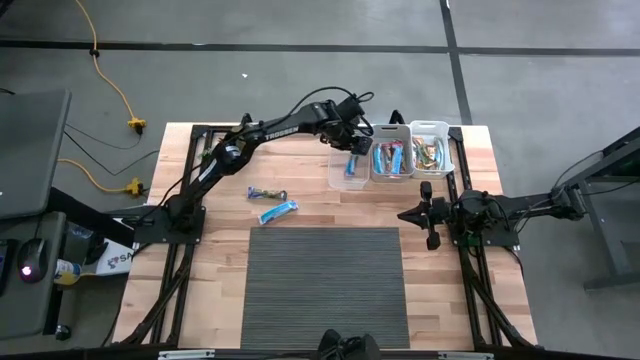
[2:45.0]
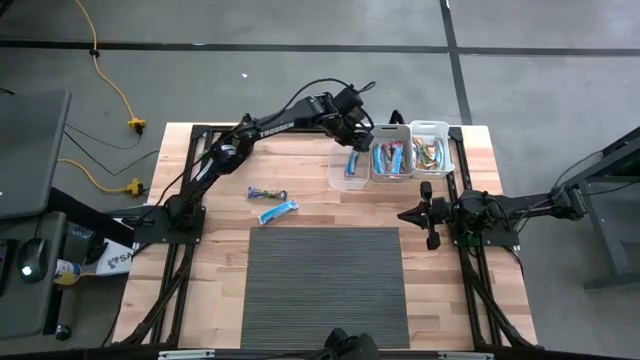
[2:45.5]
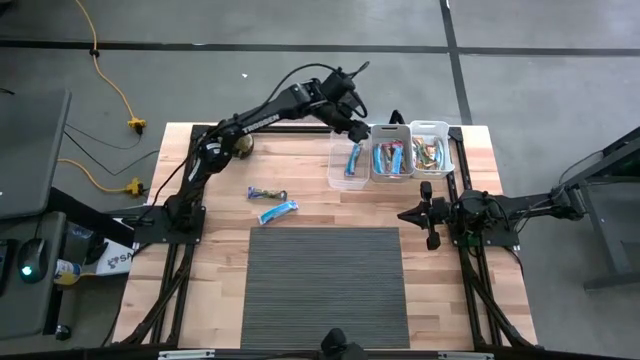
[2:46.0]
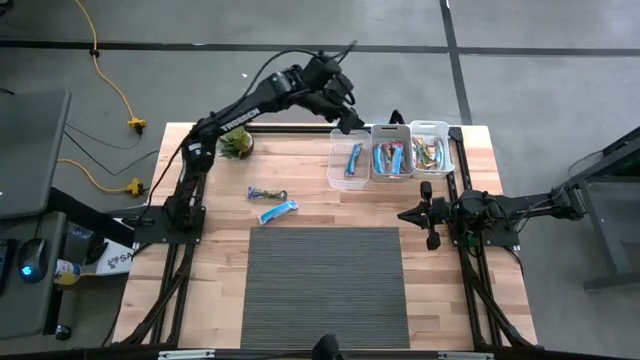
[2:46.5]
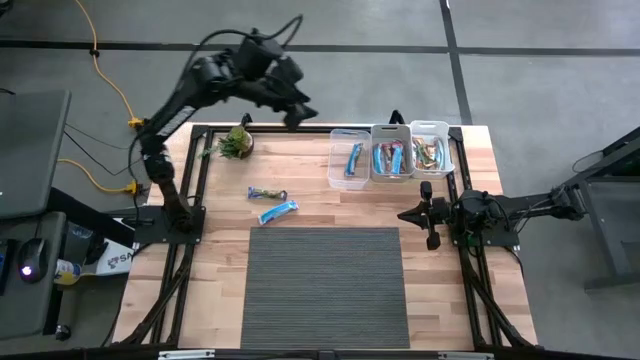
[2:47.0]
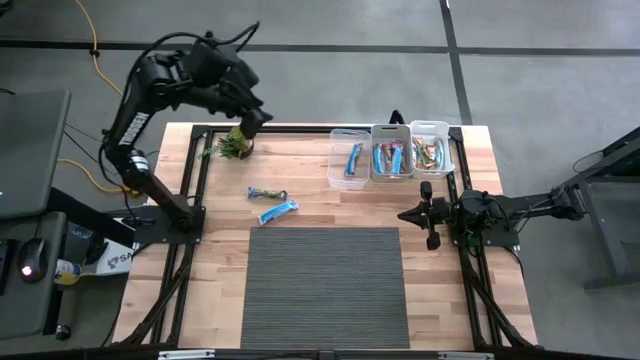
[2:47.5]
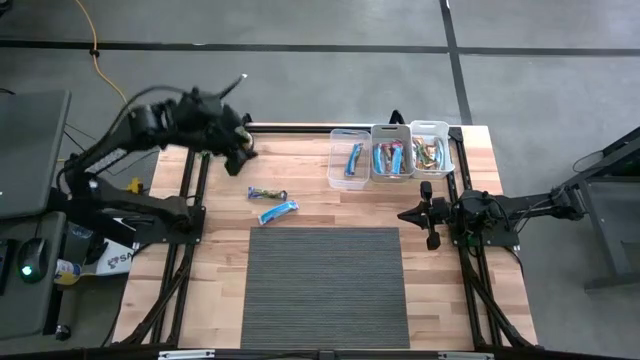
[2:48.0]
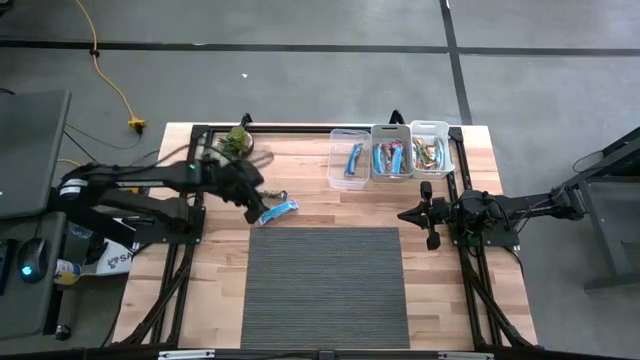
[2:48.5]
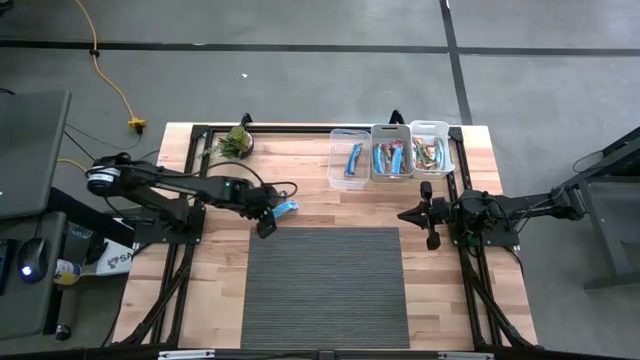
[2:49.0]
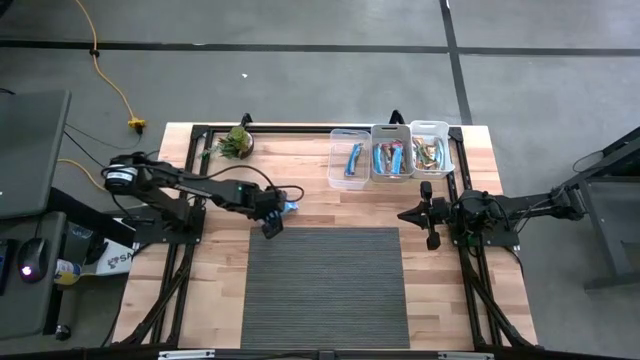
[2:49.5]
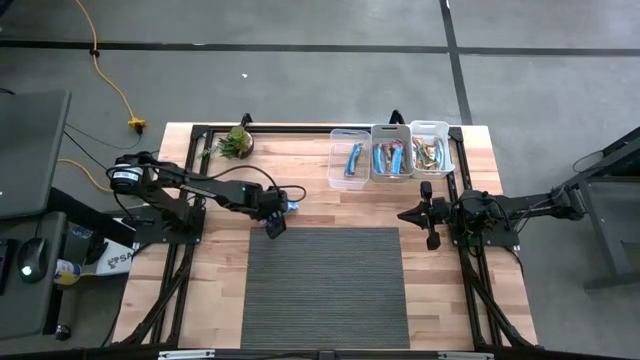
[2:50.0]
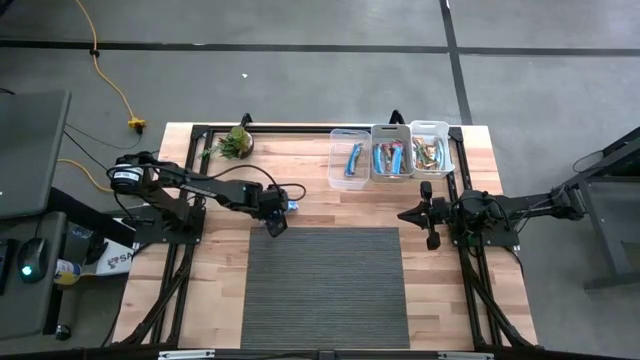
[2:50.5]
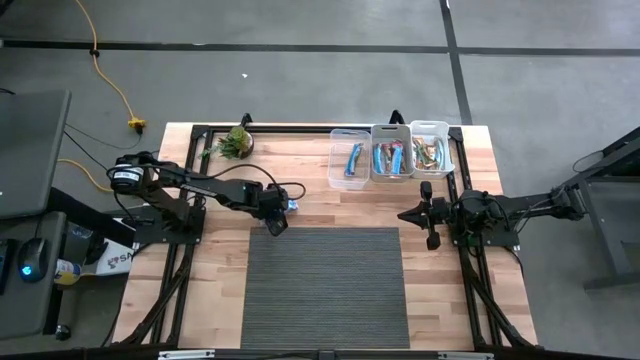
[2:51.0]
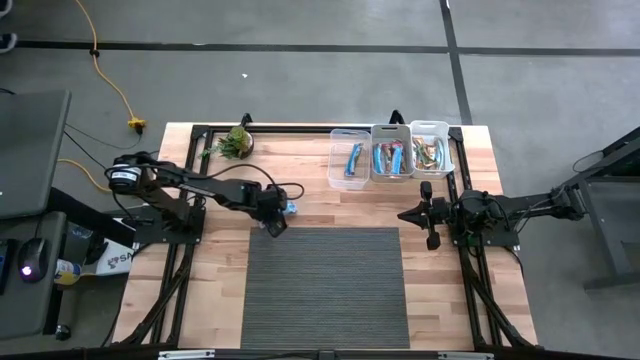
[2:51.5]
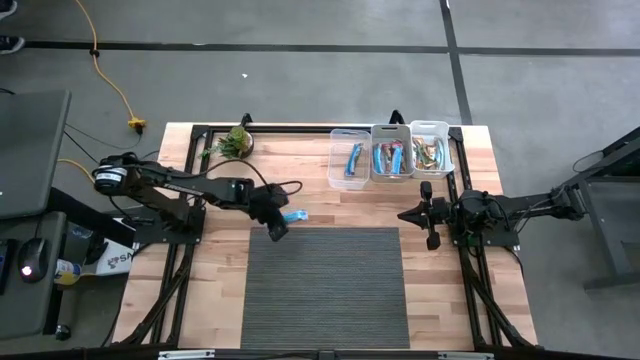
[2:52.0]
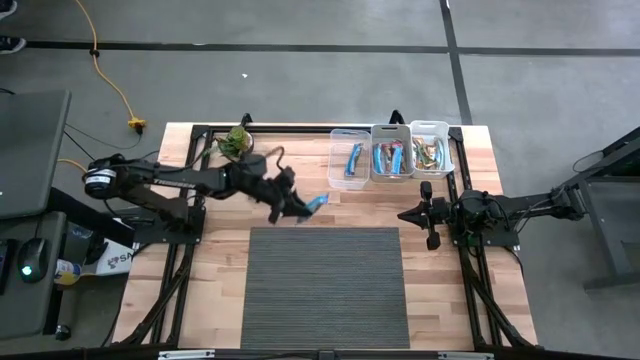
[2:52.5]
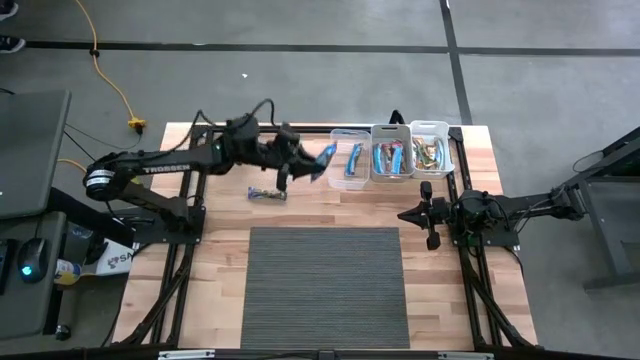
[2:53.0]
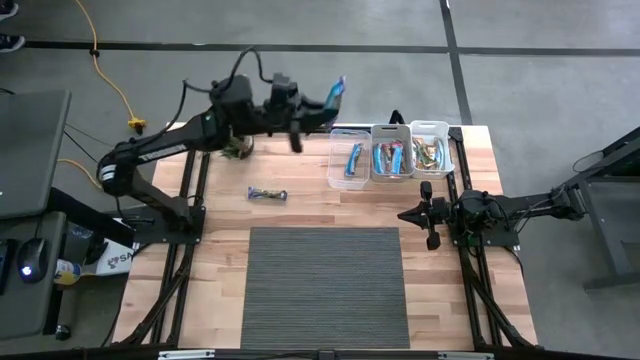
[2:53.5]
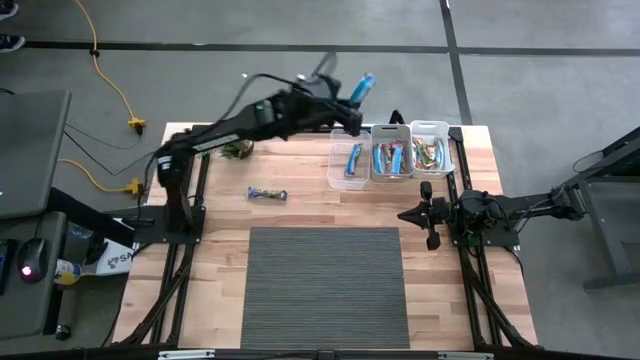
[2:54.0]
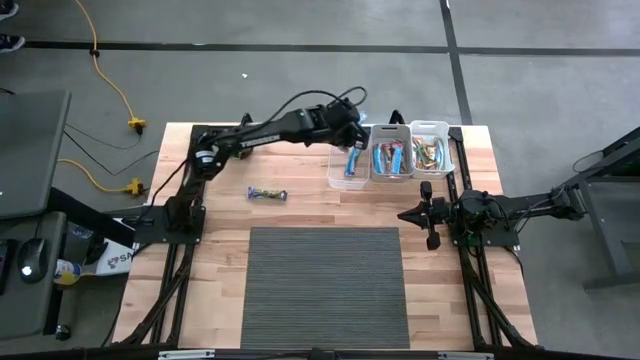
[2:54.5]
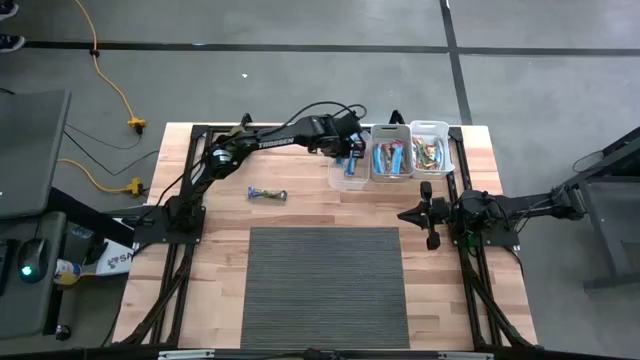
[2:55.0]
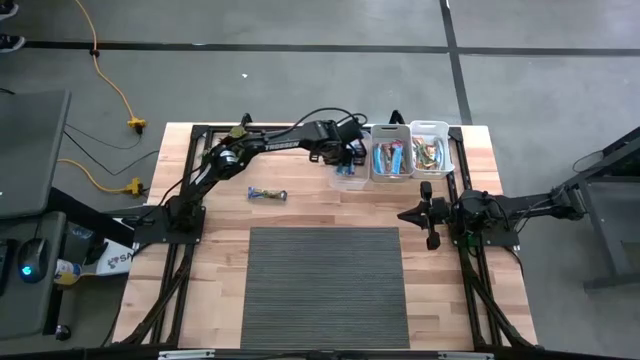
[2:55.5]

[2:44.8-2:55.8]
Task: Pick and place Granola Bars by type
Put the blue granola bar into the transparent bin

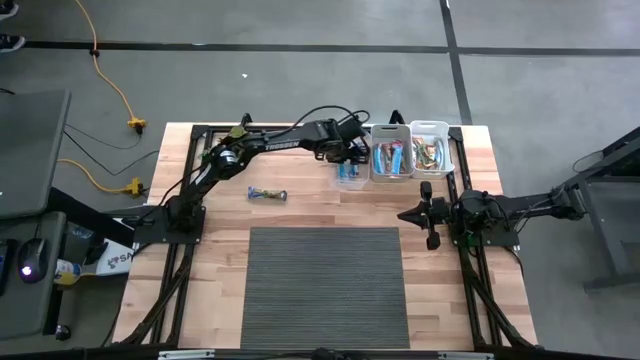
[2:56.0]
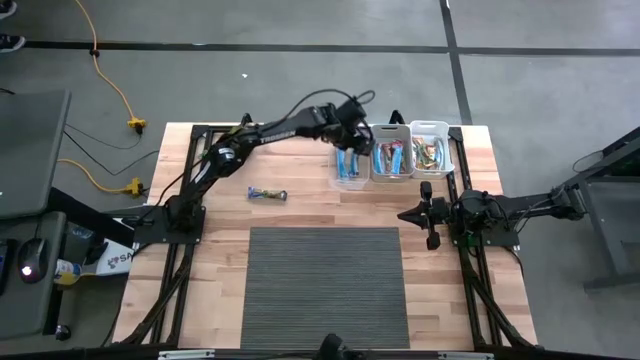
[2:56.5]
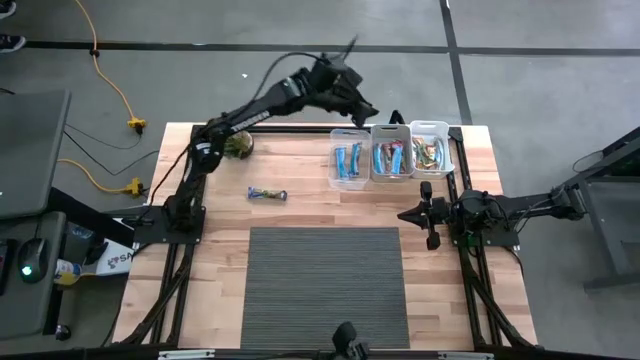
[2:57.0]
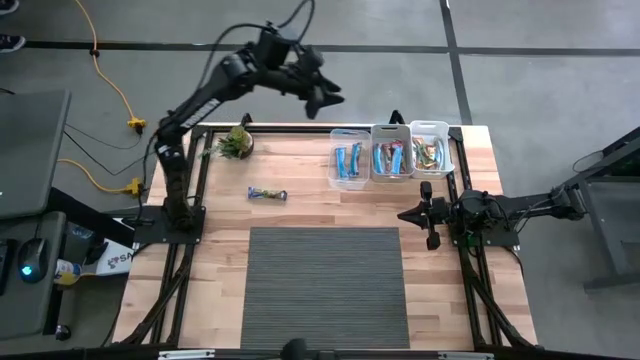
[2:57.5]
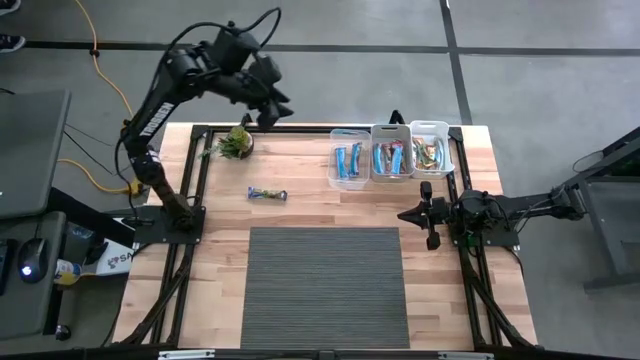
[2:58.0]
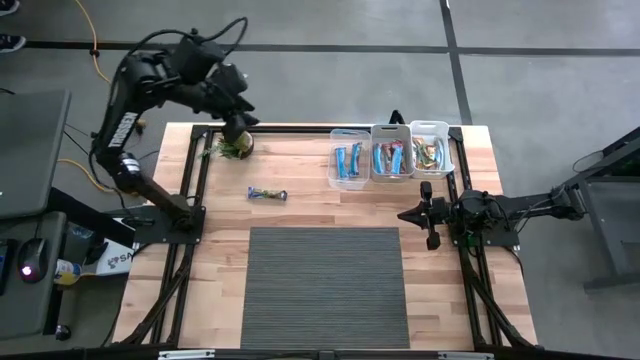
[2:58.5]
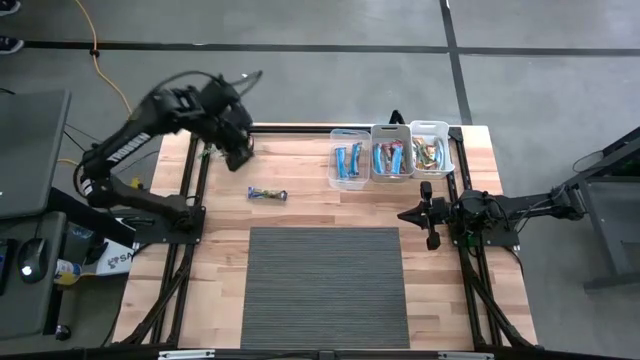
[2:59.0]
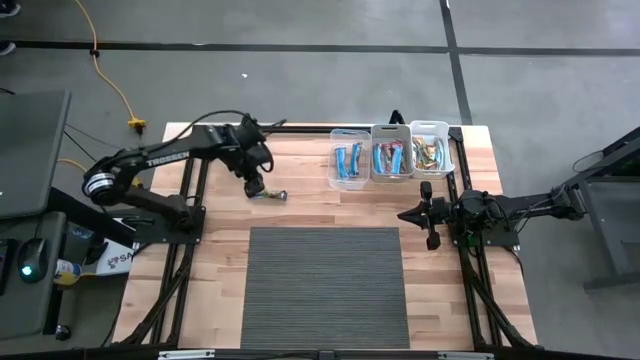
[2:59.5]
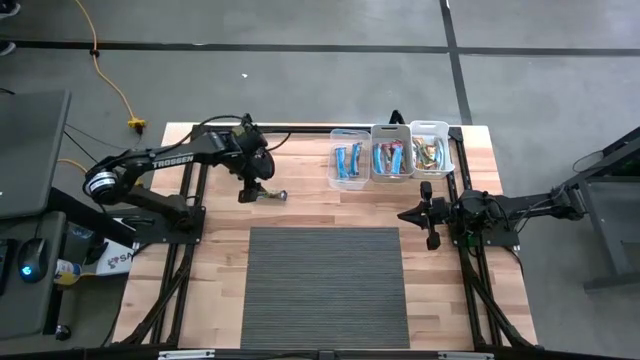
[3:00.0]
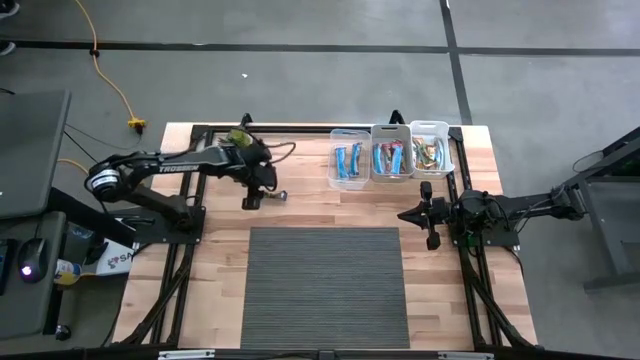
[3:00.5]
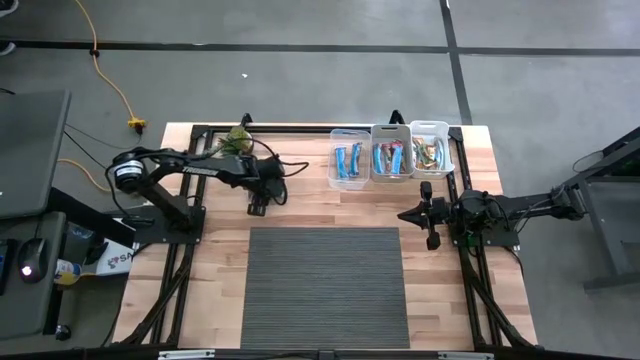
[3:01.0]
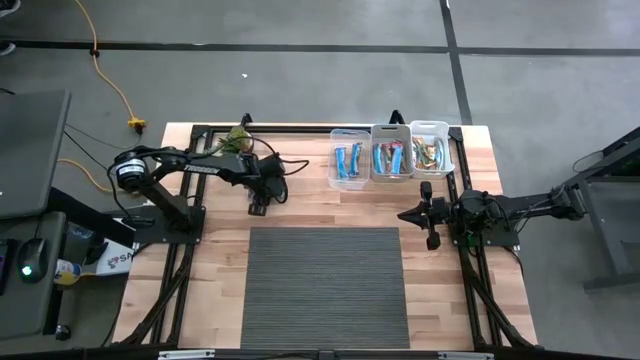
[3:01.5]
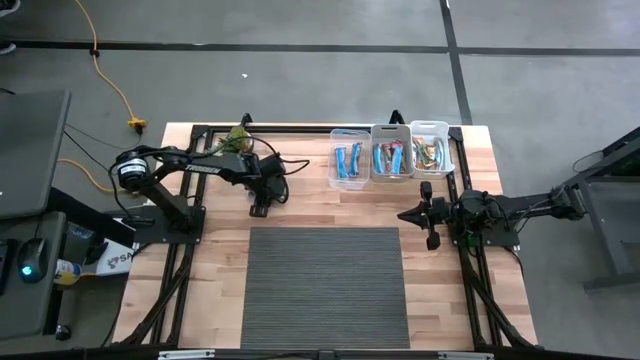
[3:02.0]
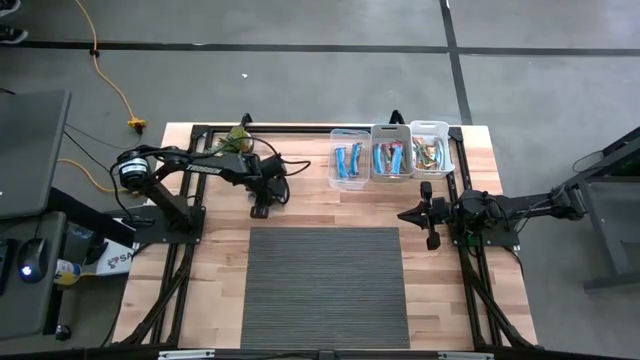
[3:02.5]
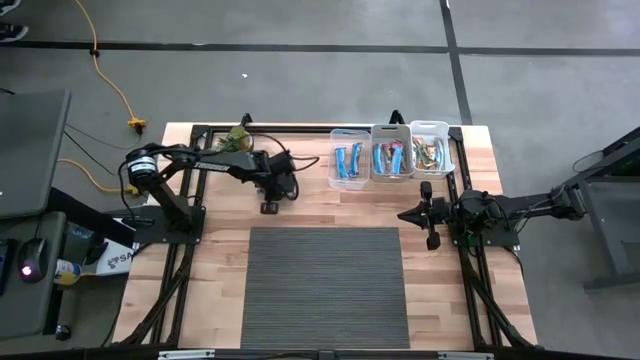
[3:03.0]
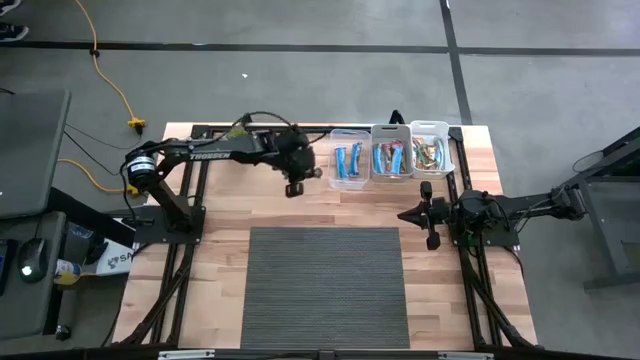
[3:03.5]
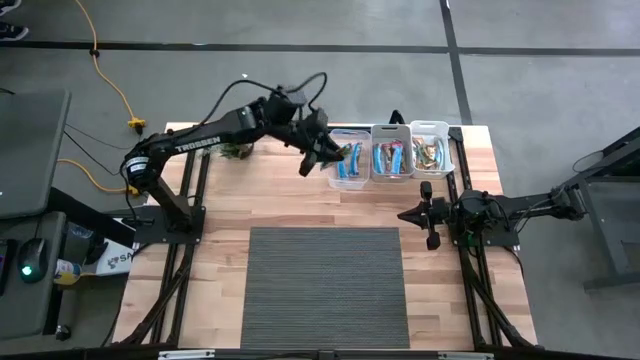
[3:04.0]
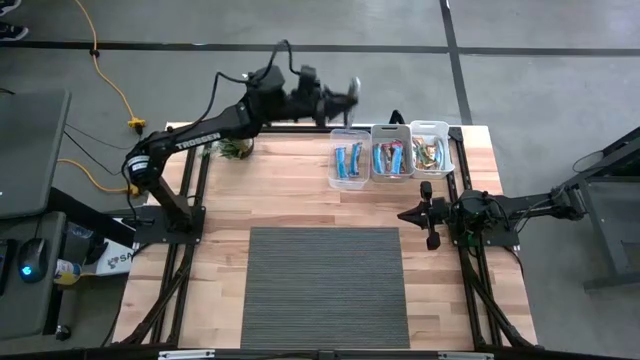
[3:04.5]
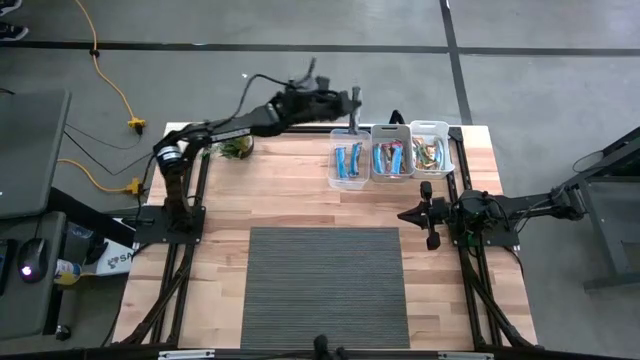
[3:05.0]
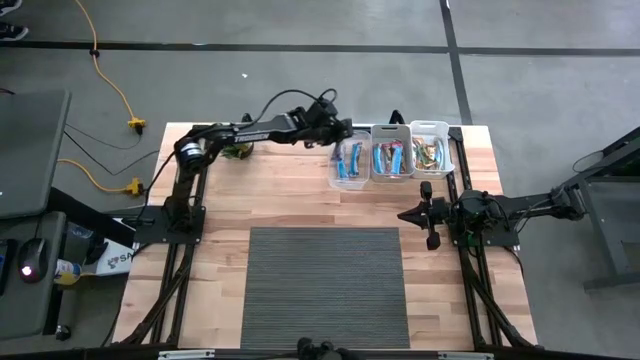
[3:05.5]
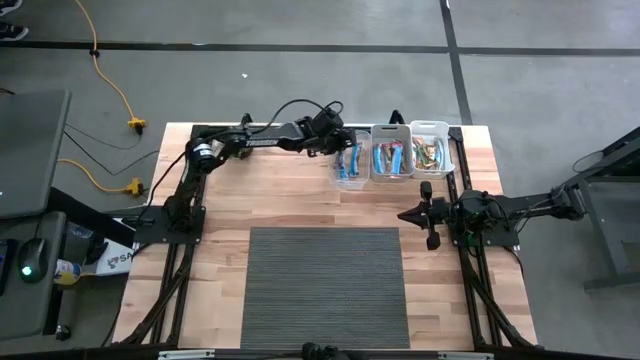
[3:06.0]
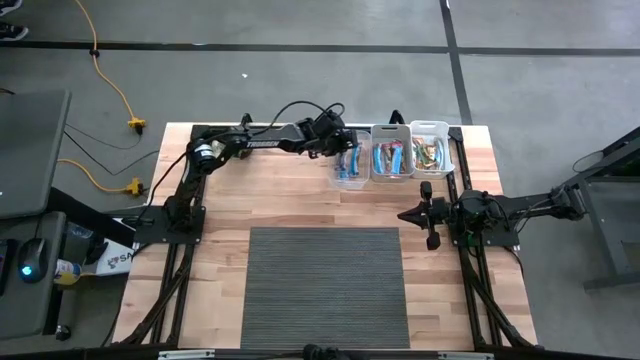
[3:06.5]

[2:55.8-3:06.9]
Put the blue granola bar into the transparent bin
